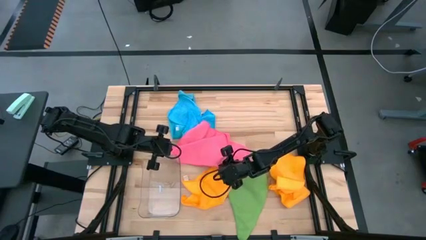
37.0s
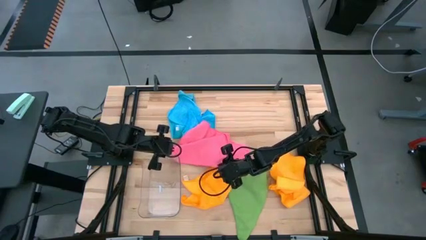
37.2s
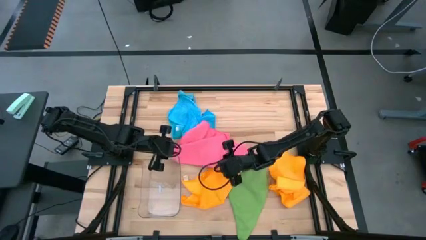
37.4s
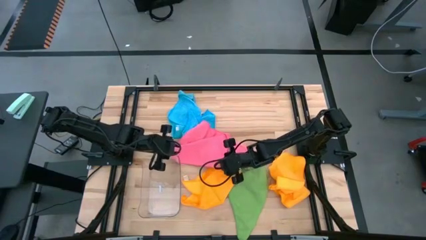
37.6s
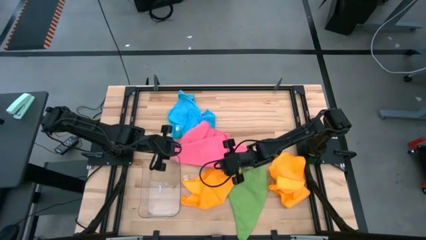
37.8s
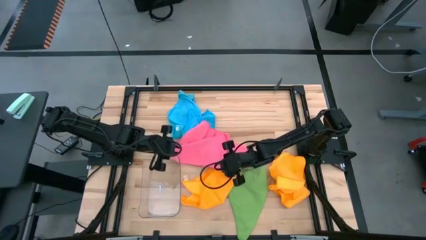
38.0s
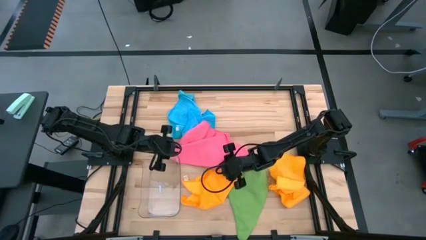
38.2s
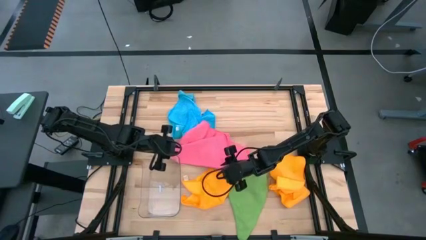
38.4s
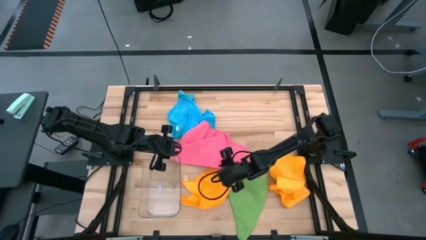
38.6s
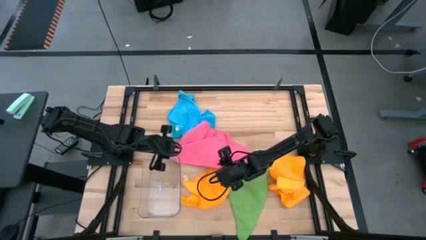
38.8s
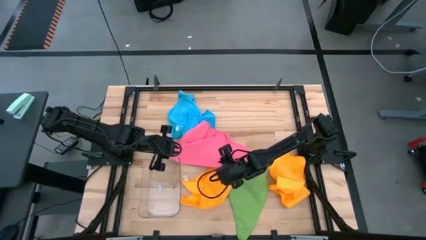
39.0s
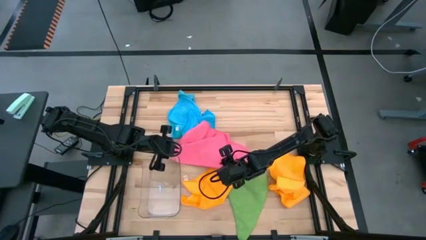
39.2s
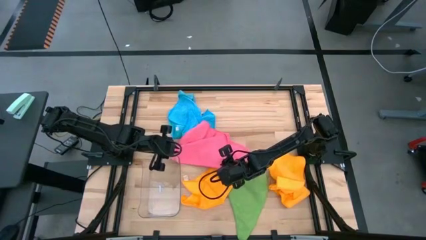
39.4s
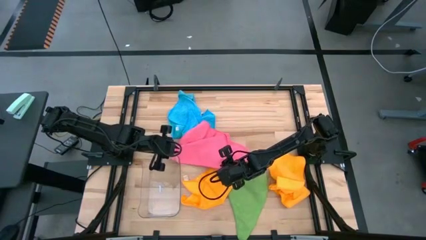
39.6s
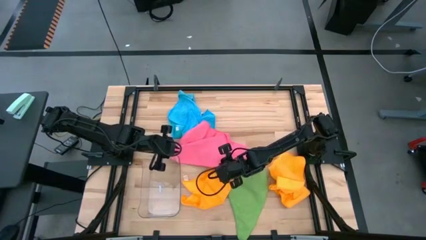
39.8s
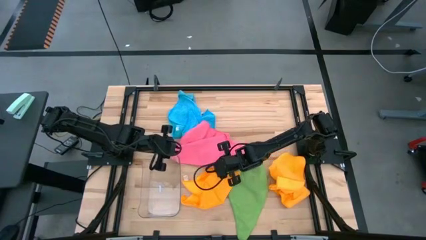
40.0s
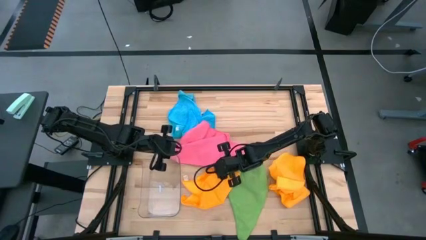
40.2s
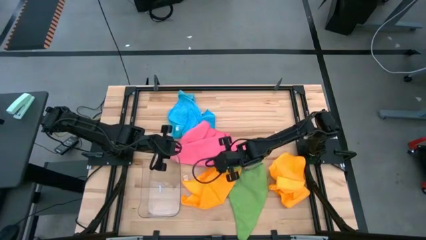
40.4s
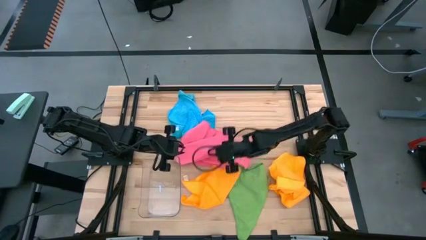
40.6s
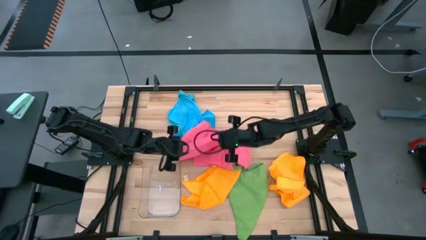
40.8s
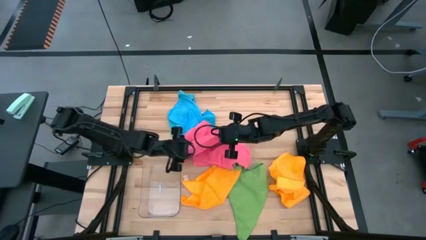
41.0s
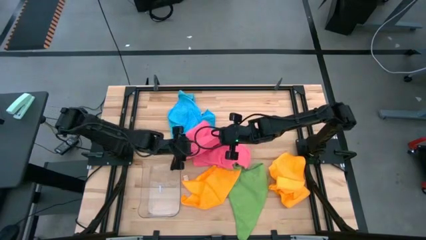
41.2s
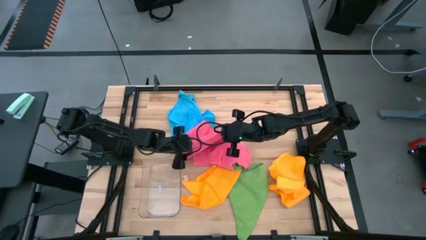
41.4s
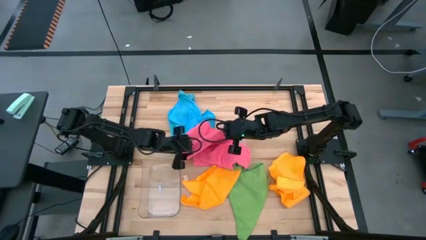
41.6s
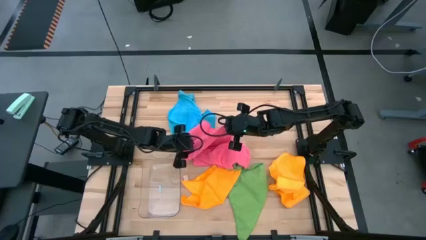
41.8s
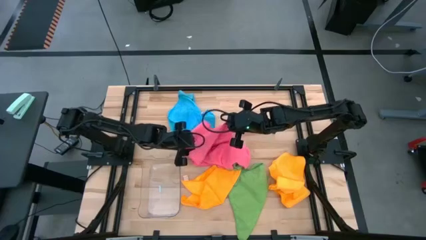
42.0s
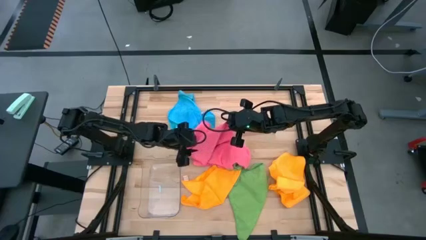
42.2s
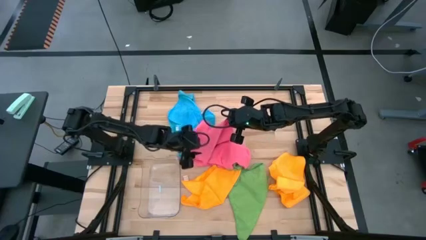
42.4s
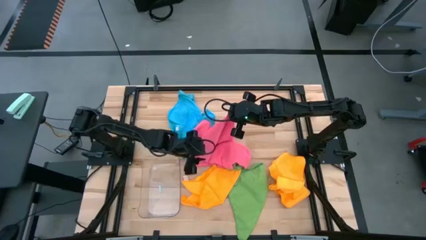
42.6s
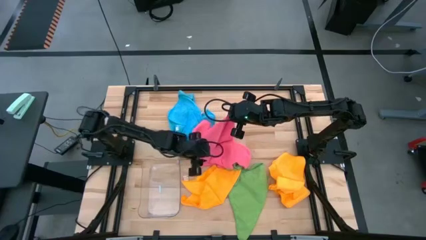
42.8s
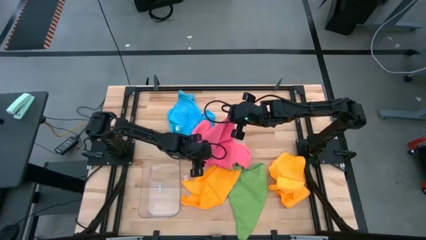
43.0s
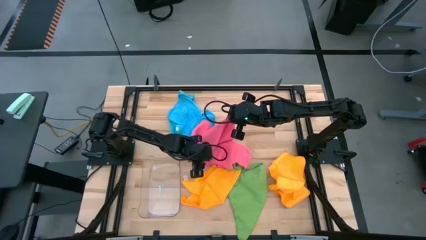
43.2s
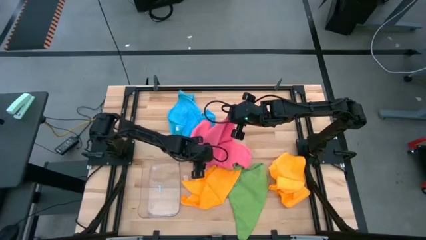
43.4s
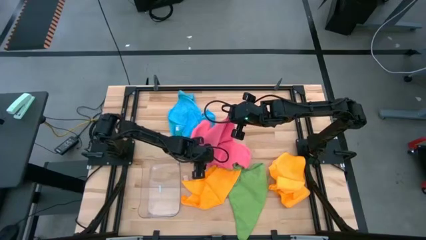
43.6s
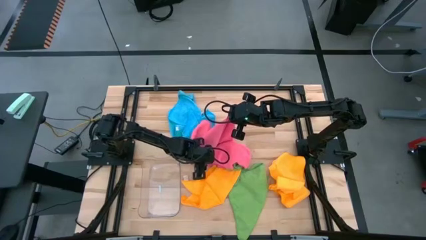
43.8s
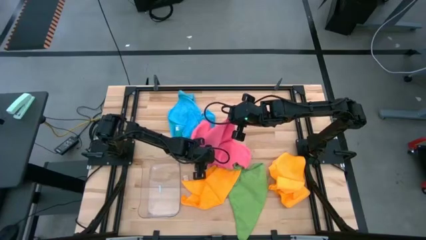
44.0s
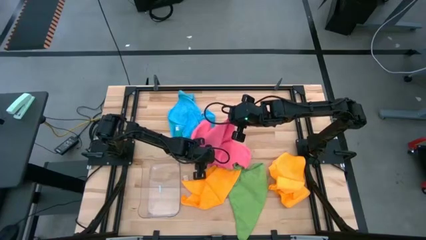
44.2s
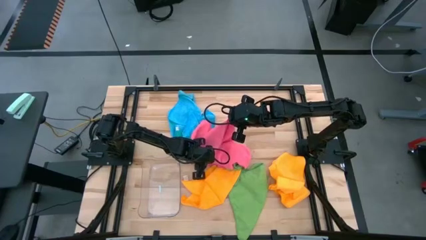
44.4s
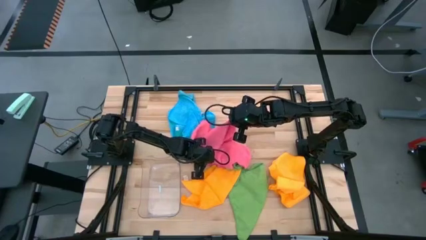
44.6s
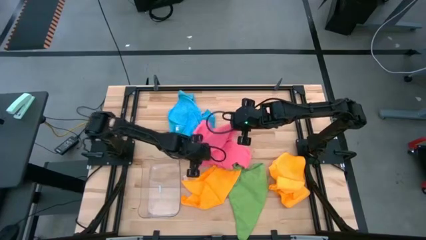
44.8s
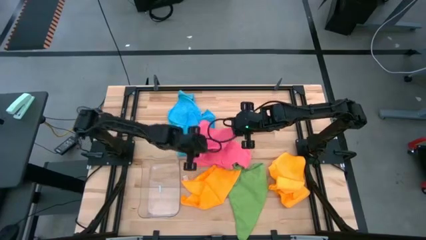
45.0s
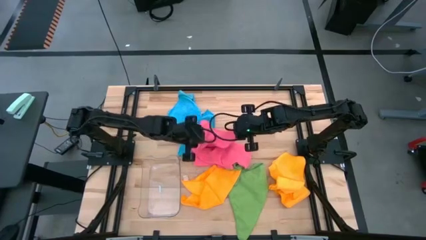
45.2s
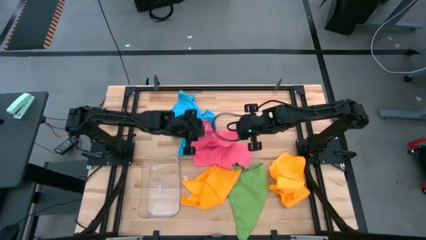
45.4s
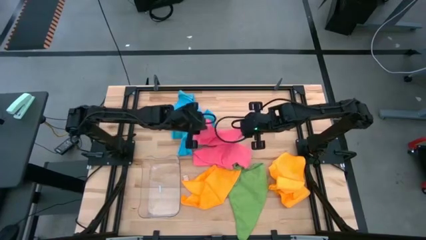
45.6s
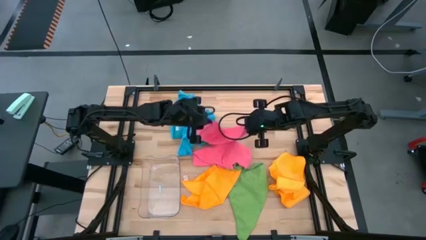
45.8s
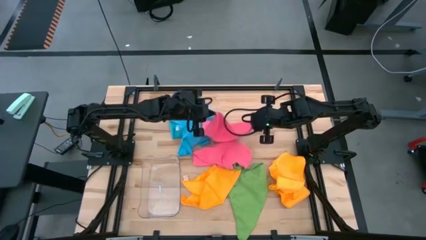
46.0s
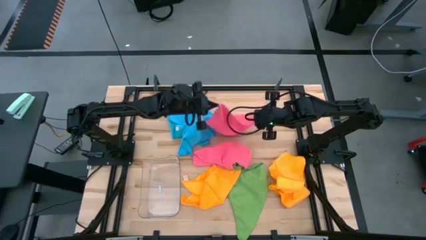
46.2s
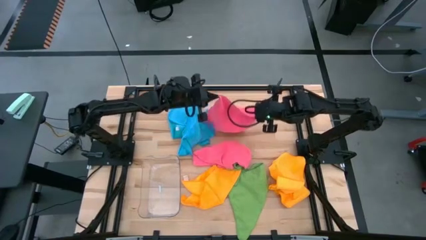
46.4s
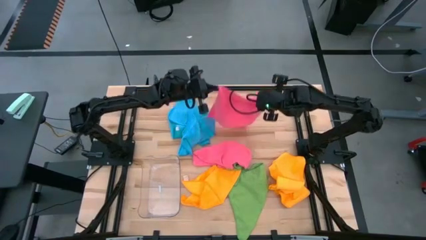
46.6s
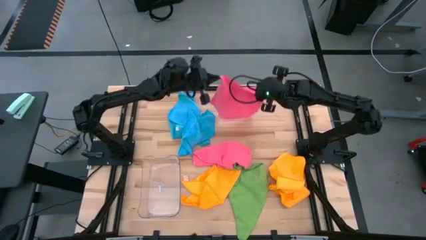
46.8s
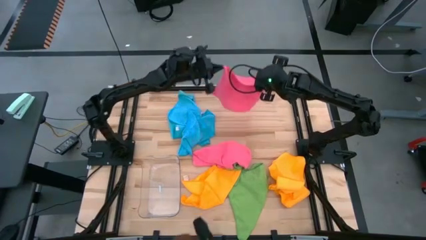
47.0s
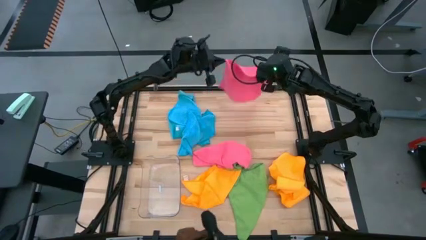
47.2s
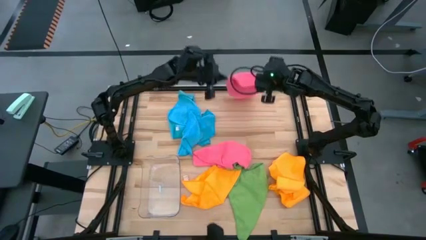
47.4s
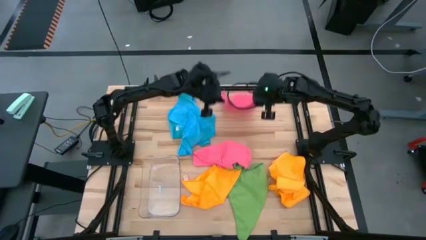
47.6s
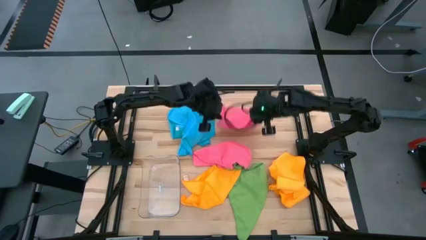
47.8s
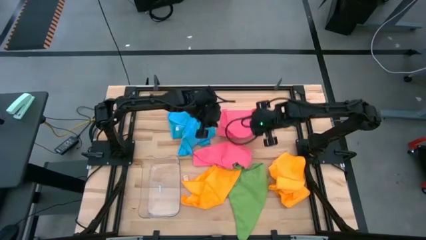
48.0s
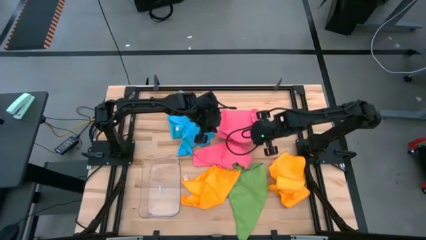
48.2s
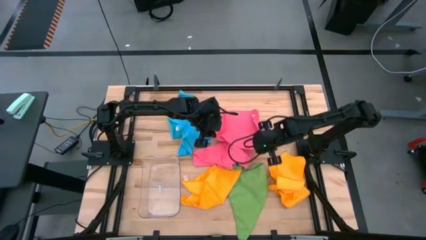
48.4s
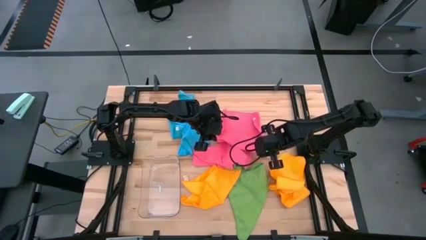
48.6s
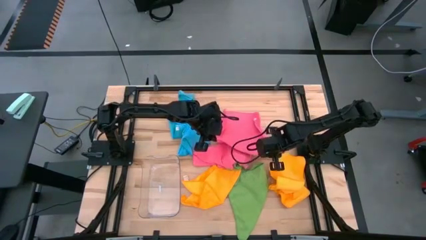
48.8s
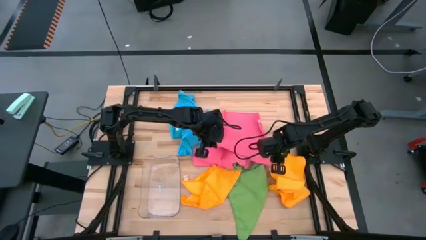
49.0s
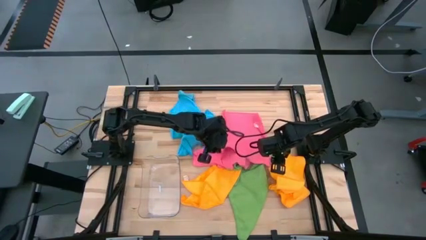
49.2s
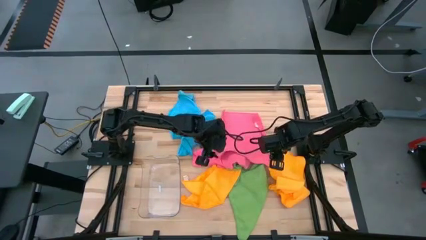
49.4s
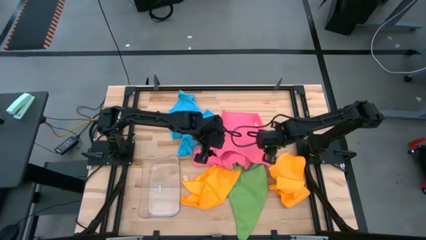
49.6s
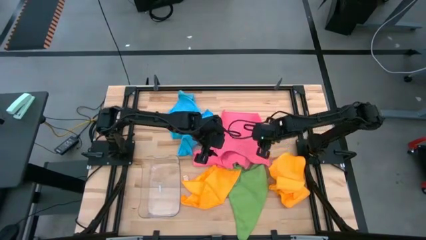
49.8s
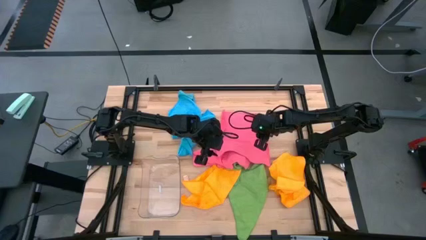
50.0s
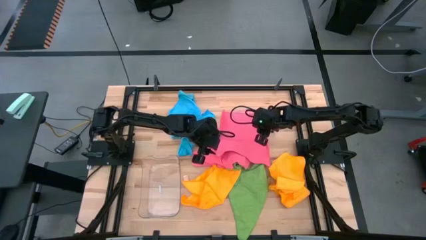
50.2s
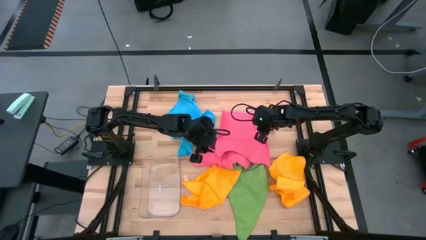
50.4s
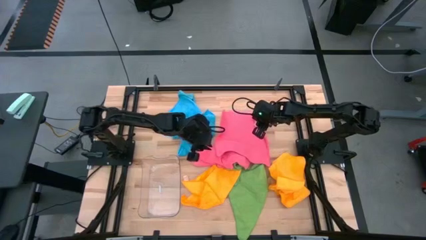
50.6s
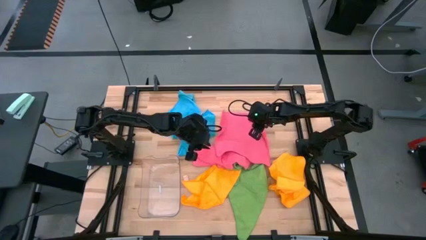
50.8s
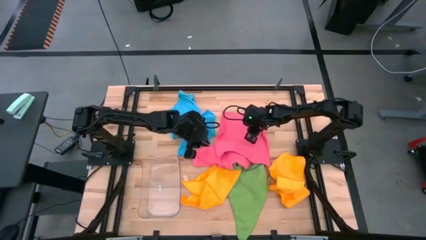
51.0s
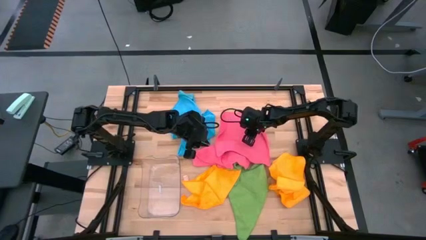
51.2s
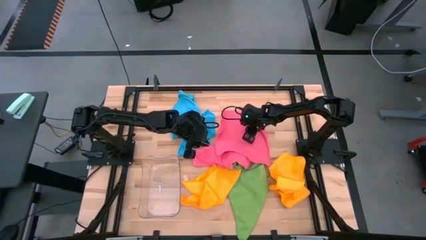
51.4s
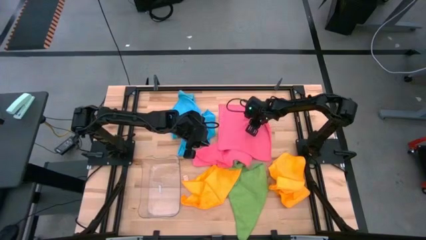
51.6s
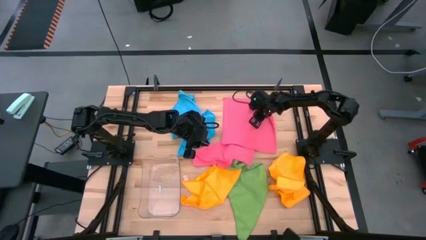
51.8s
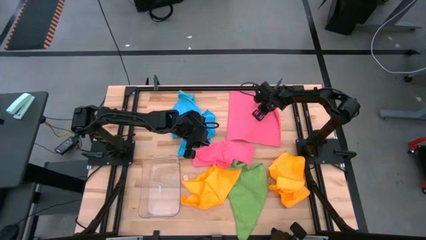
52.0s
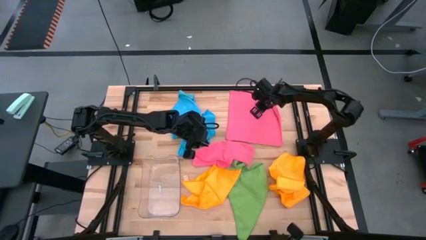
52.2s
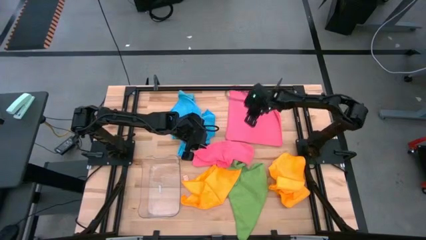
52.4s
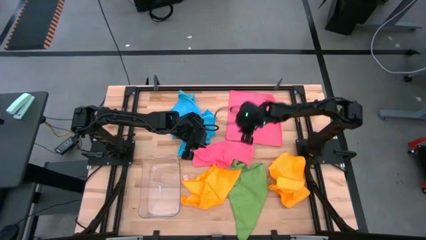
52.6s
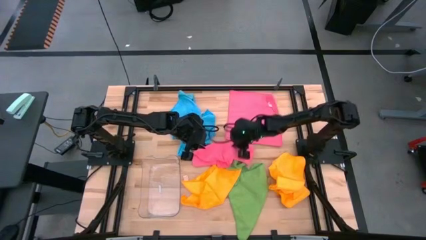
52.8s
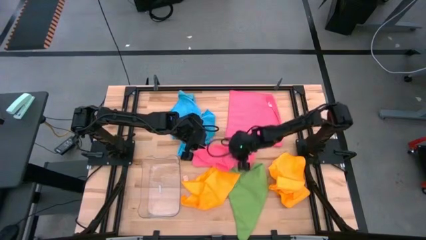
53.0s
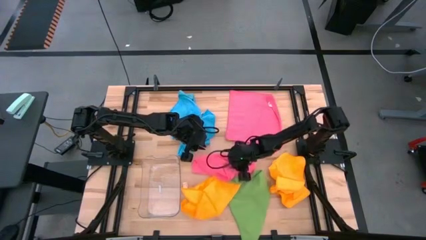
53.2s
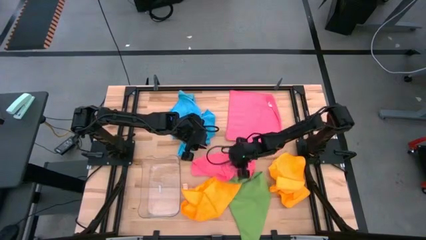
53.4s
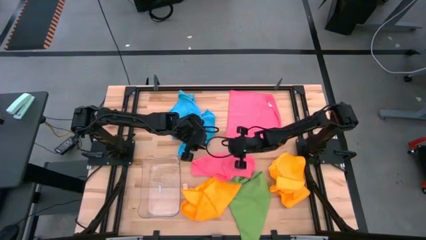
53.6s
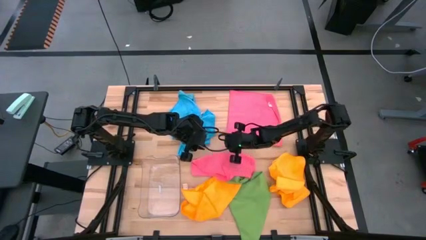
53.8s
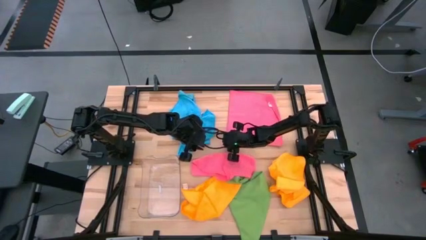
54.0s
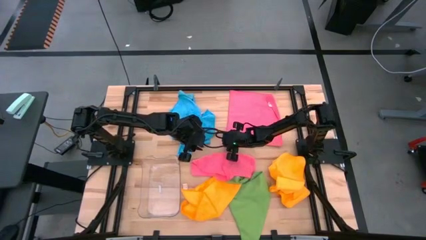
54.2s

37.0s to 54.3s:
Task: Fold microfiber towels
Fold the top pink microfiber cloth
